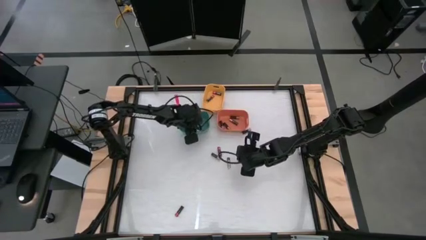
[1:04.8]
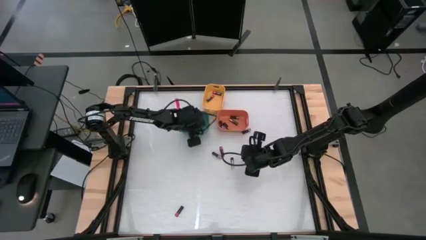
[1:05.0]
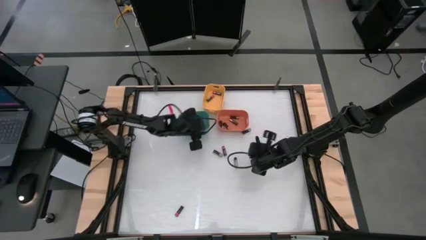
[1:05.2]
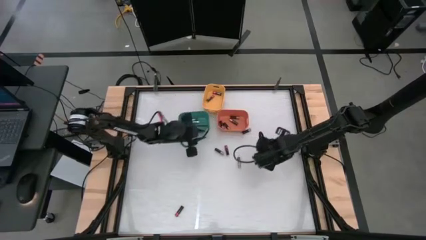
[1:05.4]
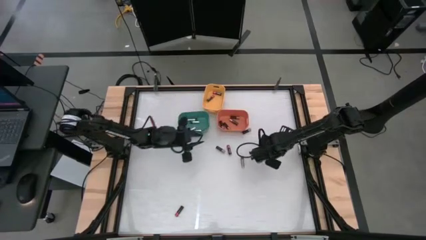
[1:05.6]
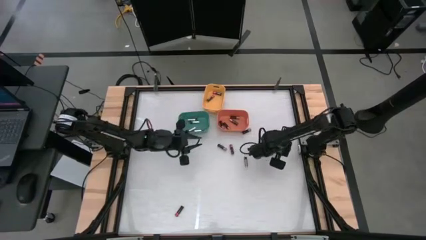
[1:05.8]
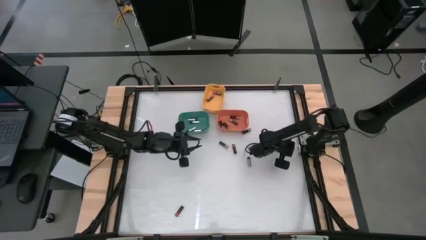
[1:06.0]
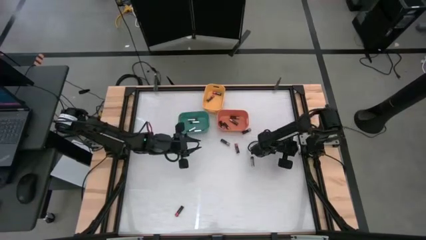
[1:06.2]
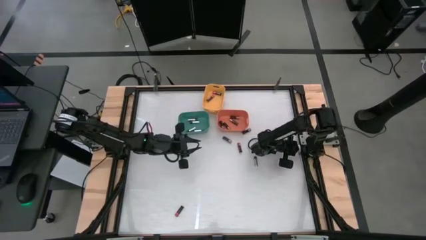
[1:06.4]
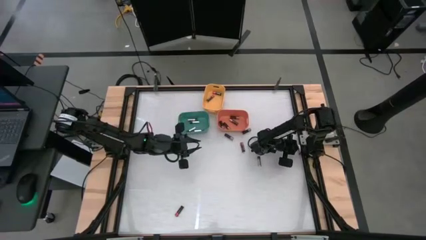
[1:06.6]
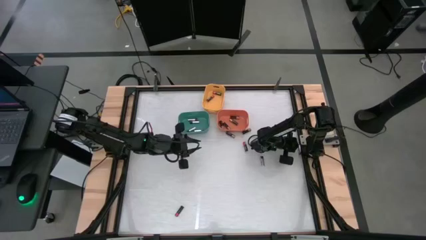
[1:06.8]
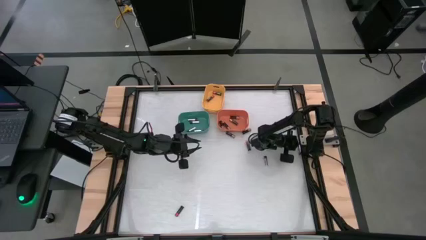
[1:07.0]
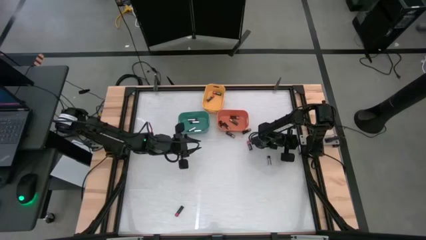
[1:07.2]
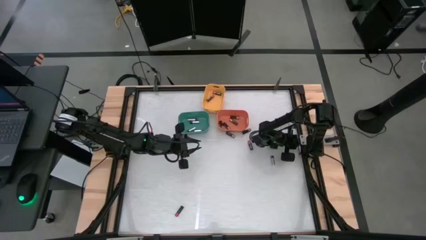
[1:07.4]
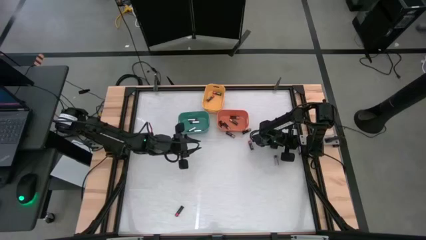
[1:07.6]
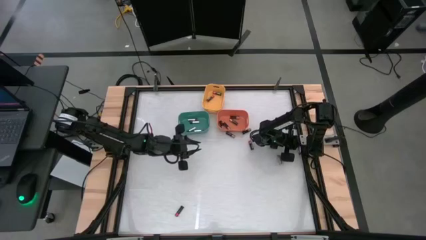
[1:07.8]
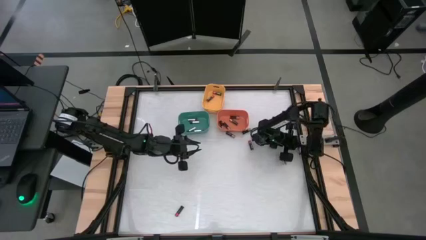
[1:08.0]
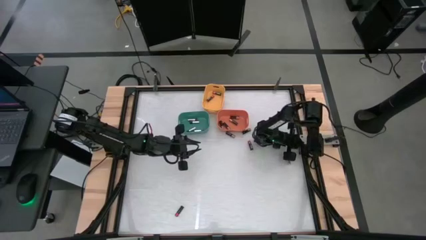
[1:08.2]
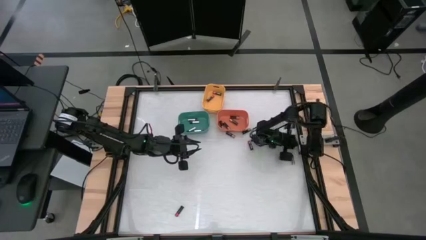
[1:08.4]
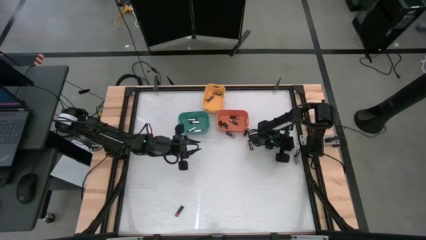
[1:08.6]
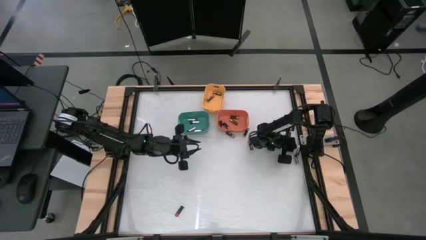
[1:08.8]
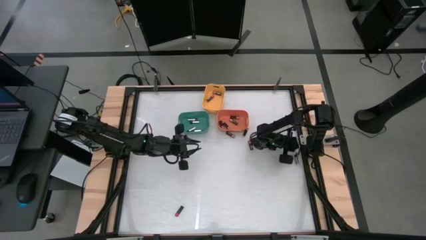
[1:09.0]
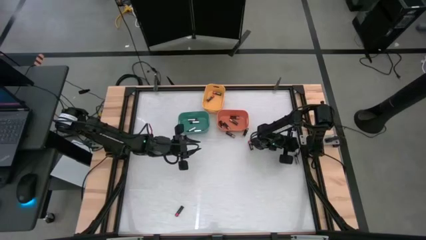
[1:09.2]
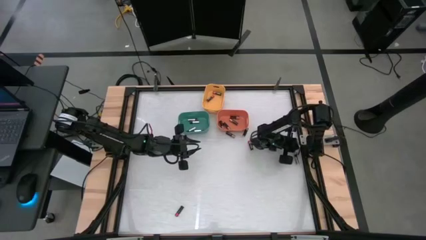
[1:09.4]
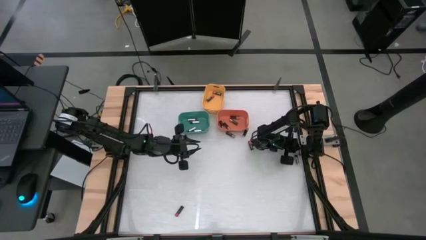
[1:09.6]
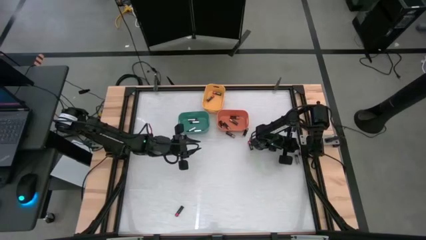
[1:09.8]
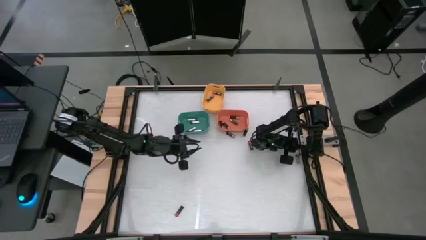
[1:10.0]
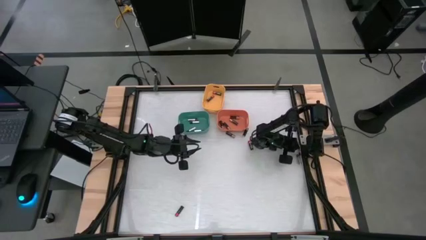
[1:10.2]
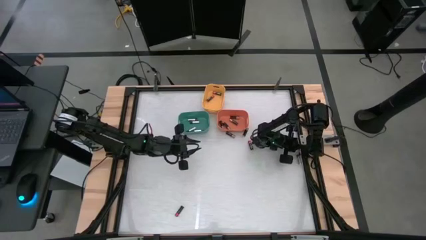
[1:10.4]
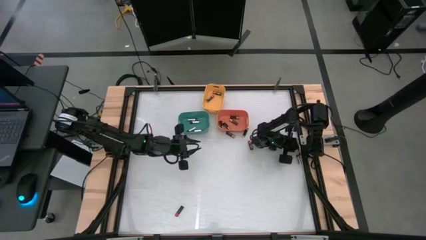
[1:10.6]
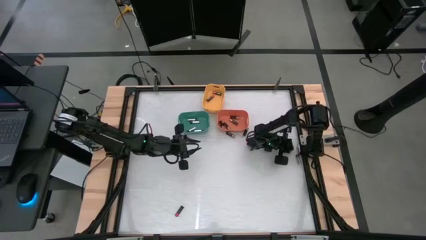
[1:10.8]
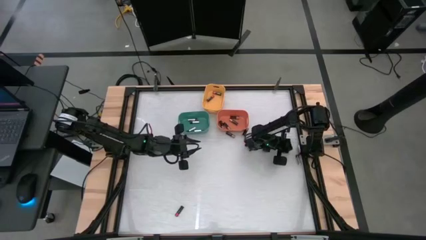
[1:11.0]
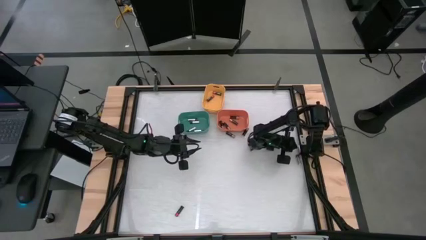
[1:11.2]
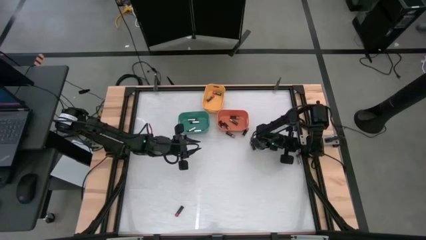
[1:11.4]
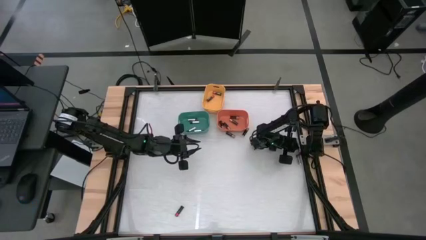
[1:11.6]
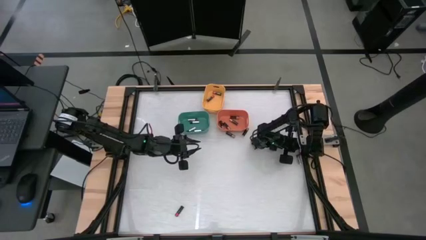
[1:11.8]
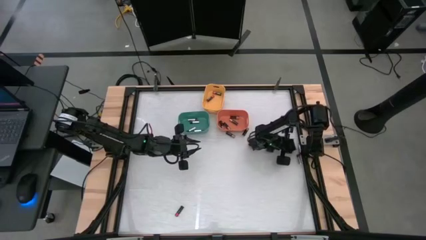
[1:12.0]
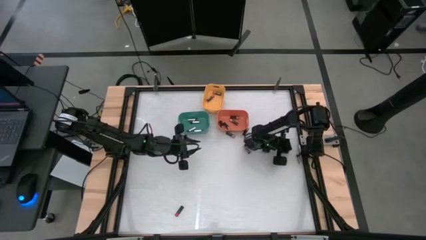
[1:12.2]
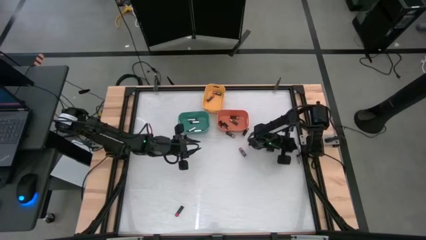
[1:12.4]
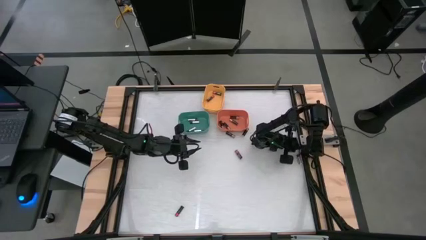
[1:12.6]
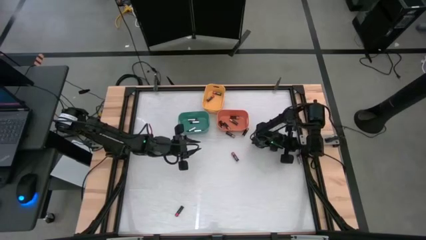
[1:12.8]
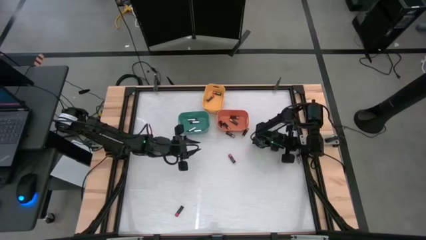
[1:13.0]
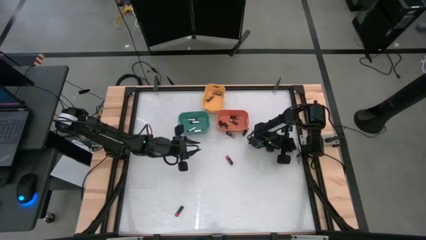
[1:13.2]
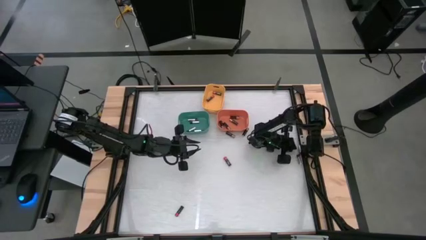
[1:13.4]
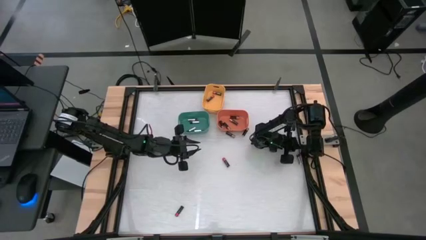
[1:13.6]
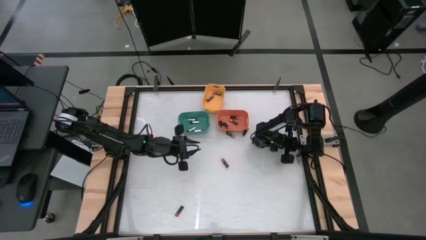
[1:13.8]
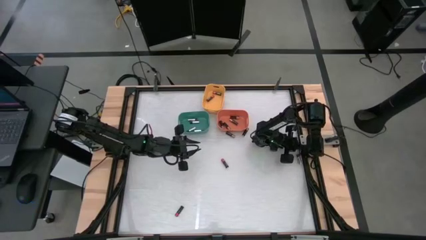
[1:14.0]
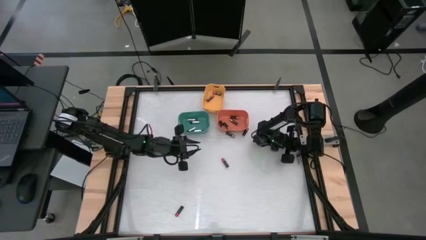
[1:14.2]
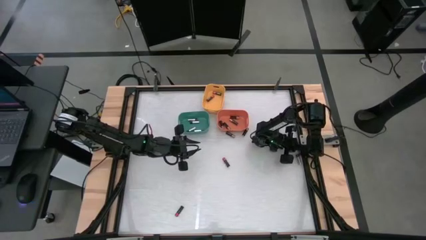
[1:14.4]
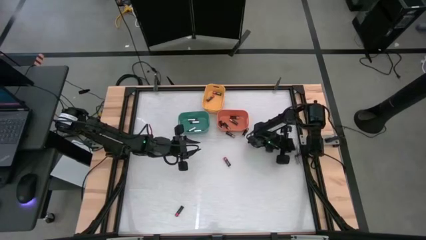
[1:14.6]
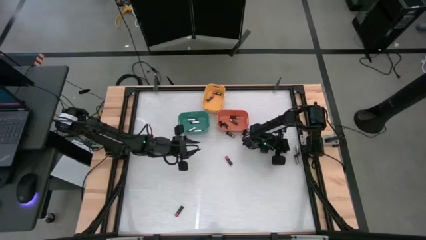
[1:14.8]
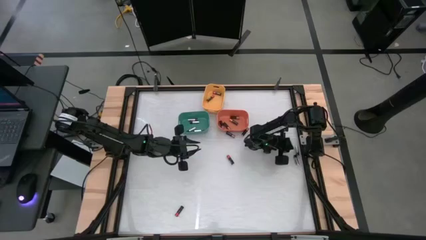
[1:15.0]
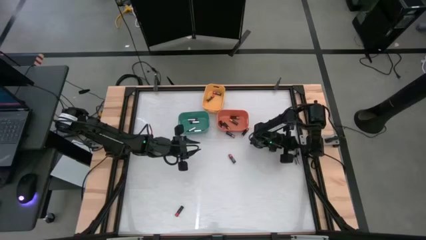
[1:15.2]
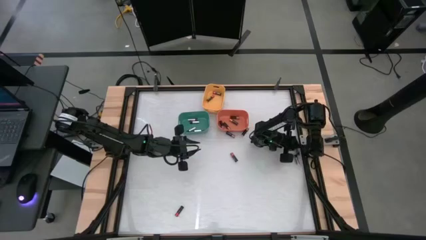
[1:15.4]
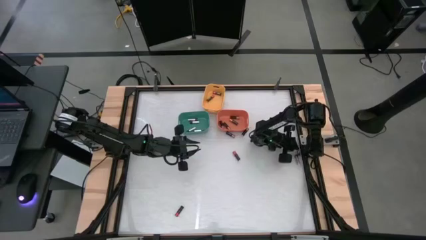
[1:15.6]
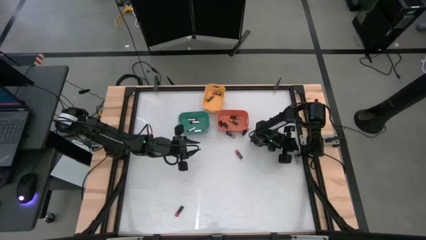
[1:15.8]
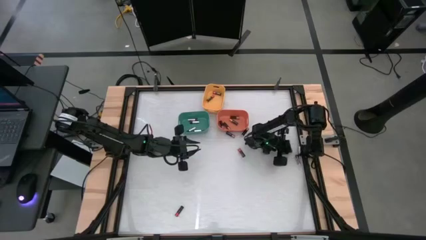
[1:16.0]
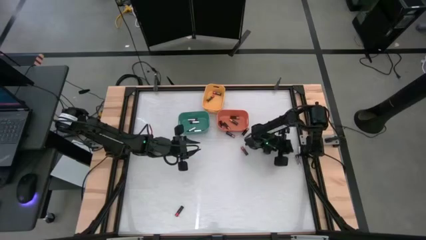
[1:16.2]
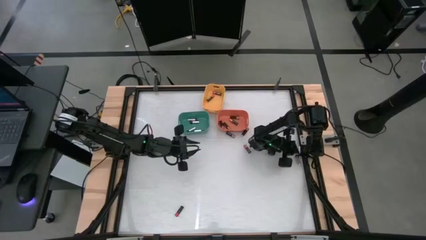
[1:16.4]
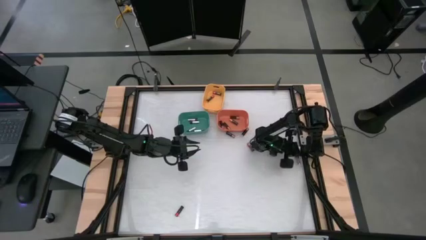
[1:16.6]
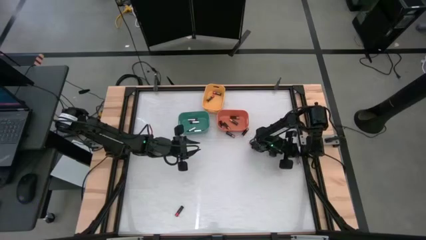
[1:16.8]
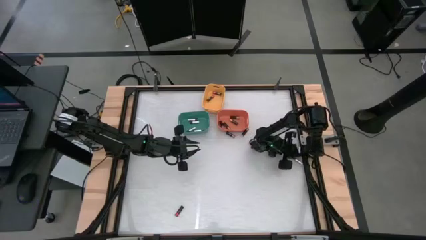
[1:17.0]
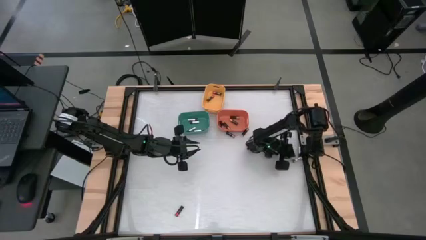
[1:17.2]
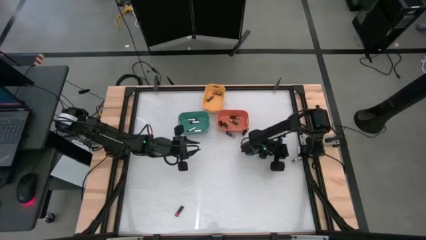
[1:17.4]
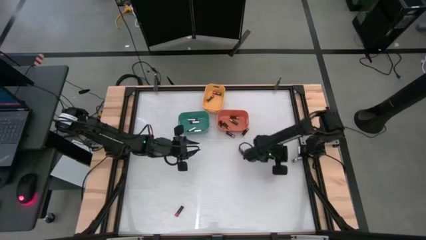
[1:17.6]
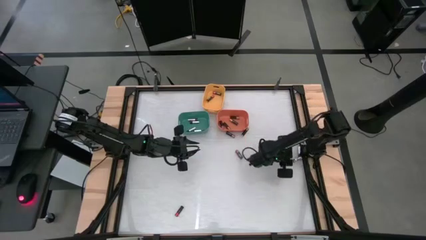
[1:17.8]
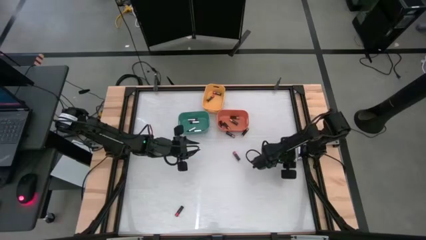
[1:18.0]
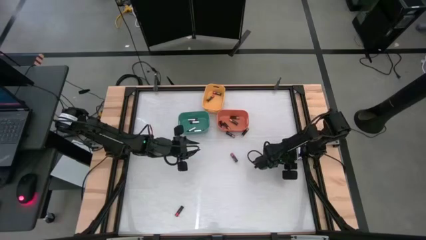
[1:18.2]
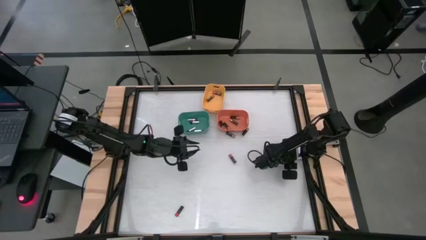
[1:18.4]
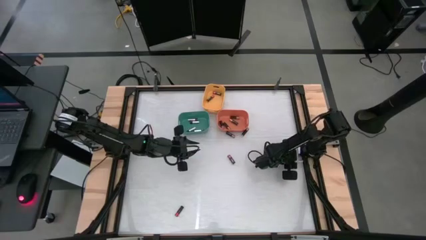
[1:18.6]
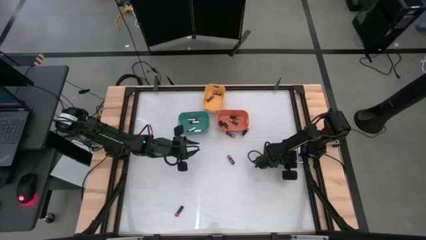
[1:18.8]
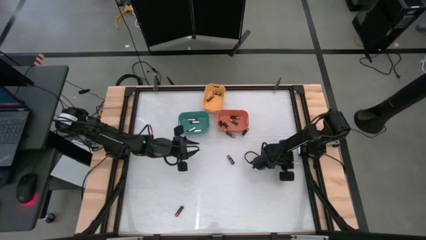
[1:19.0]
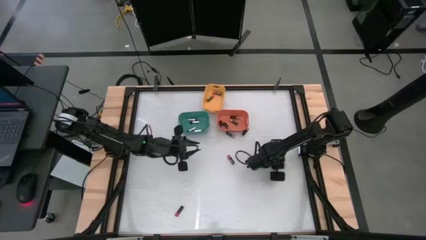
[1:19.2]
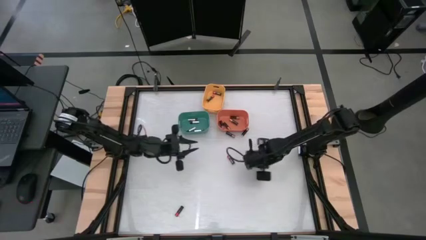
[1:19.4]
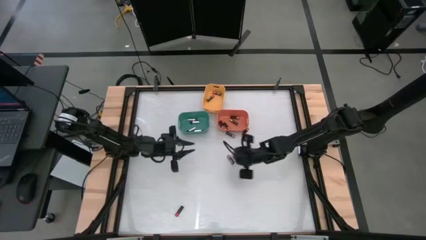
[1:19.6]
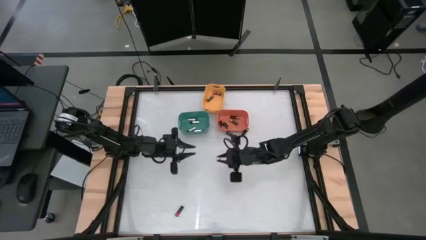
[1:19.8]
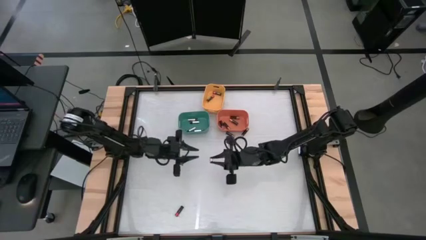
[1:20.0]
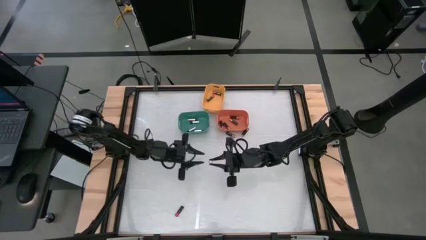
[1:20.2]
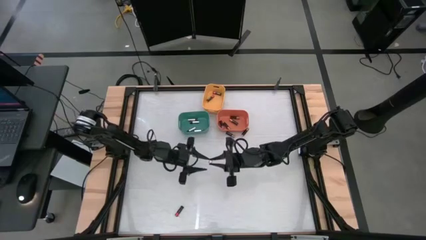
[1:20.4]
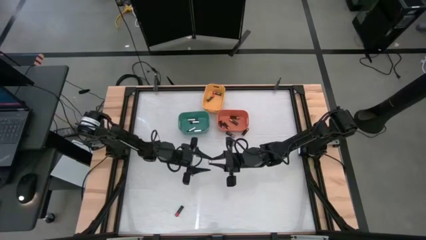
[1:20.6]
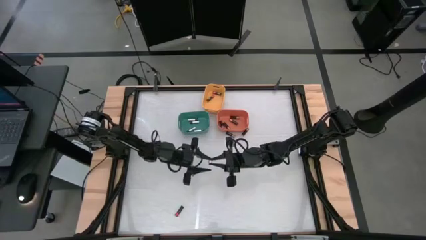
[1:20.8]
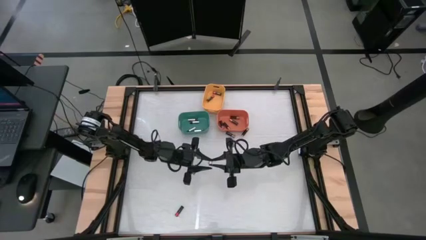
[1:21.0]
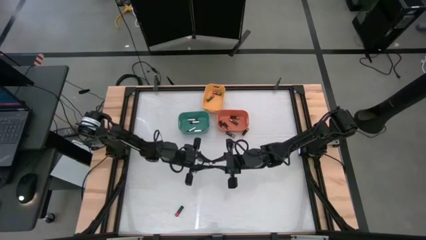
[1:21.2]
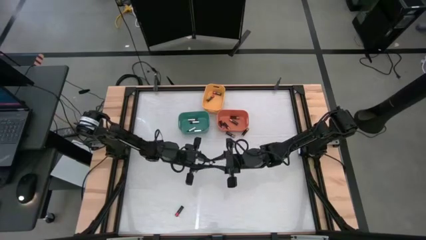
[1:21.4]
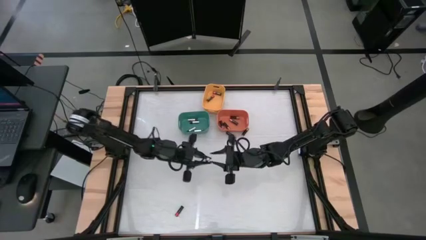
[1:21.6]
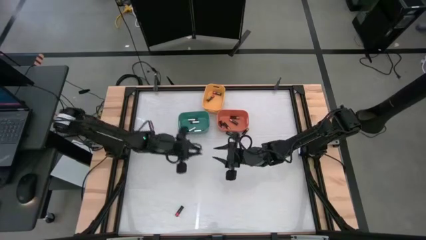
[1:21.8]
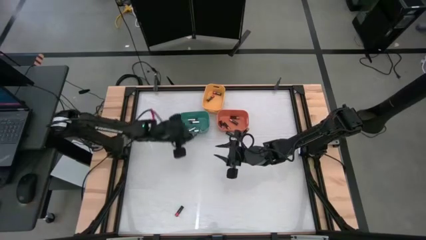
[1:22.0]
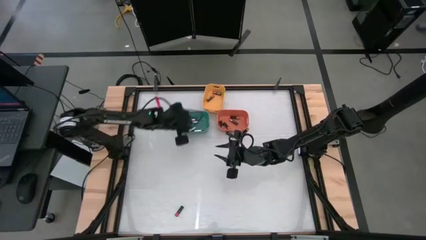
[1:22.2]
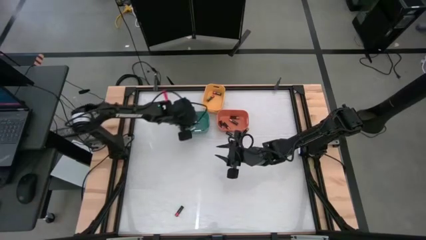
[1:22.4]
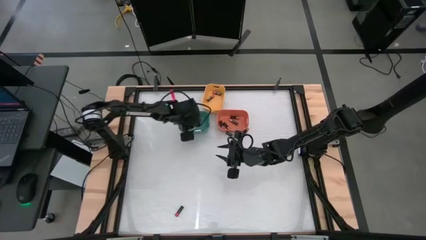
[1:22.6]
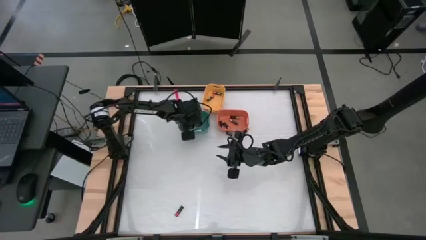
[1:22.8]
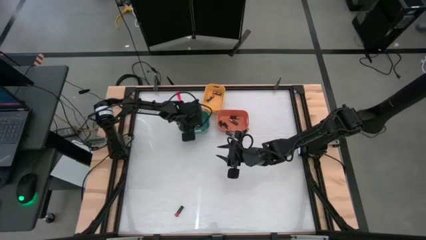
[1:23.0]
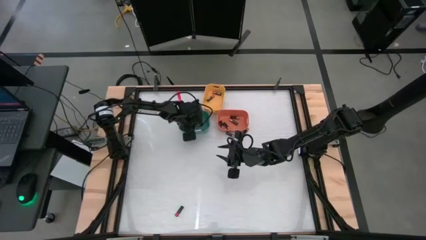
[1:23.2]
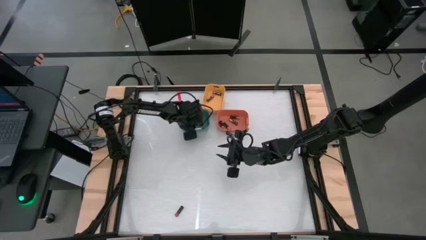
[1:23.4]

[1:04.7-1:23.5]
Task: Sort batteries
Put the silver battery into the green bin
